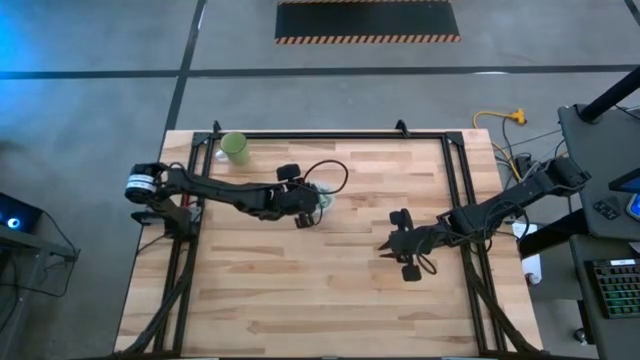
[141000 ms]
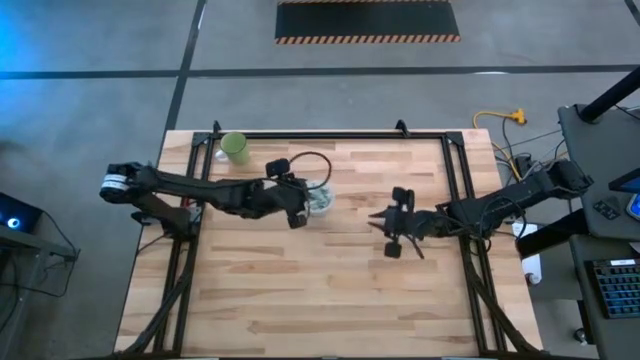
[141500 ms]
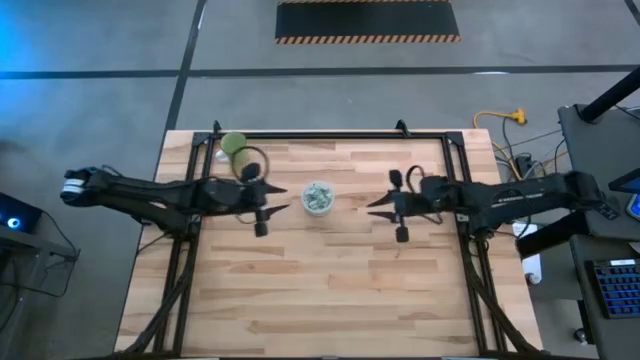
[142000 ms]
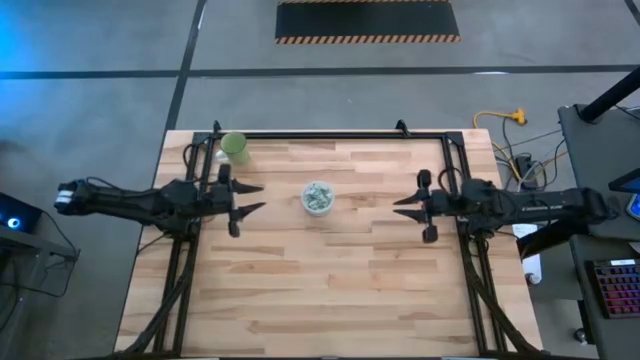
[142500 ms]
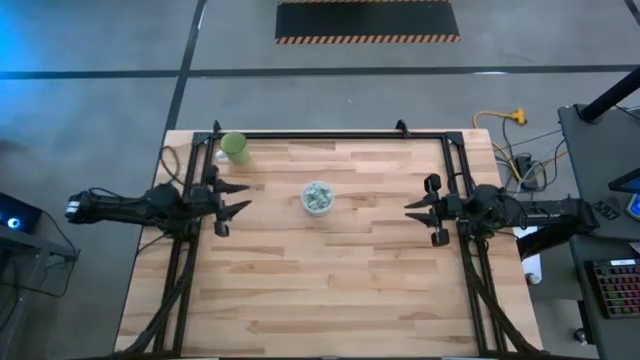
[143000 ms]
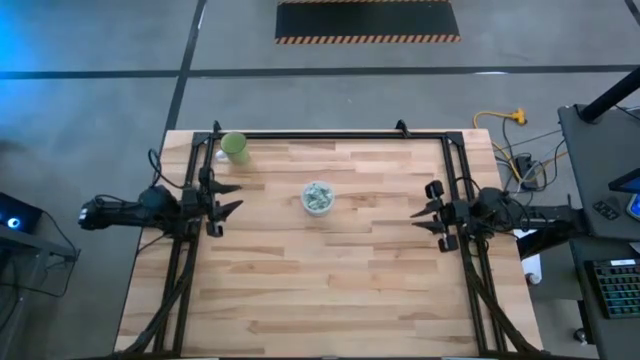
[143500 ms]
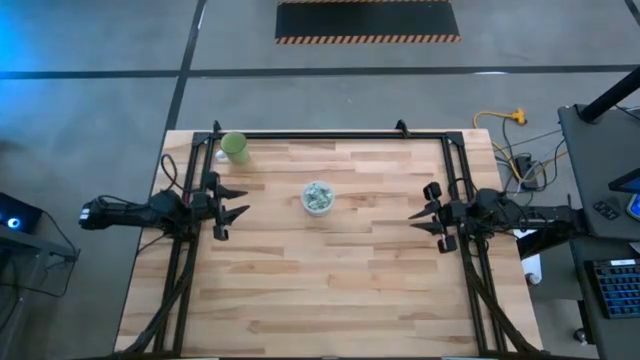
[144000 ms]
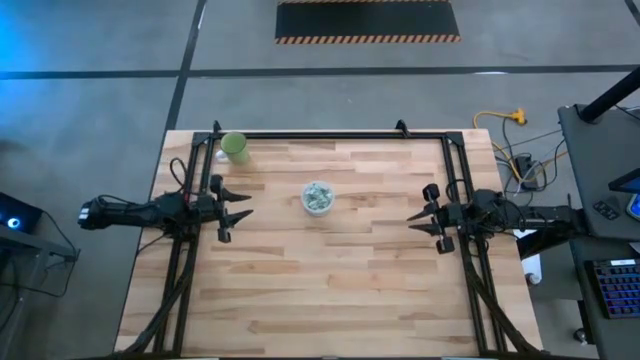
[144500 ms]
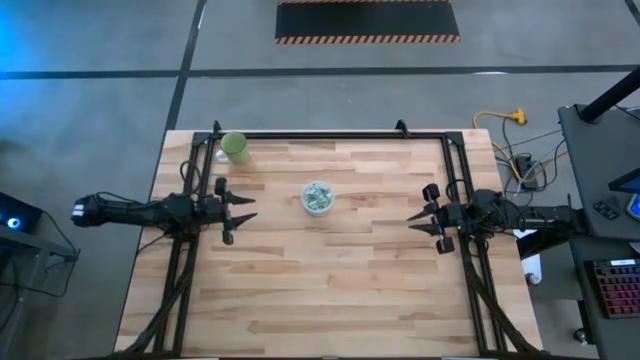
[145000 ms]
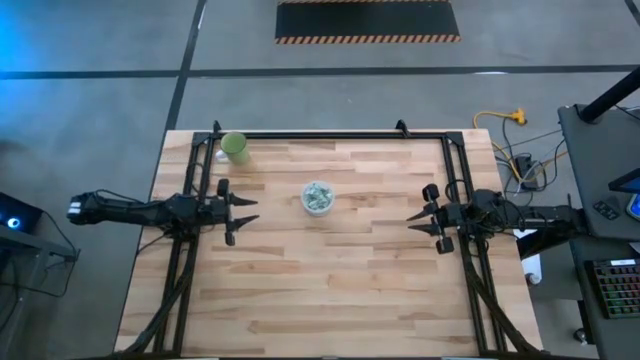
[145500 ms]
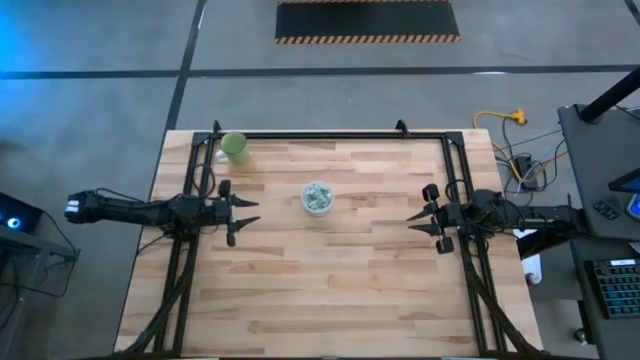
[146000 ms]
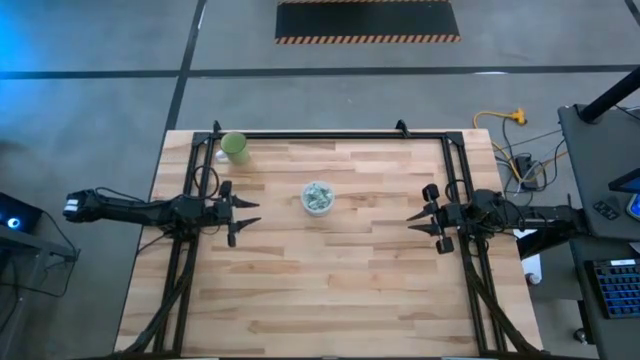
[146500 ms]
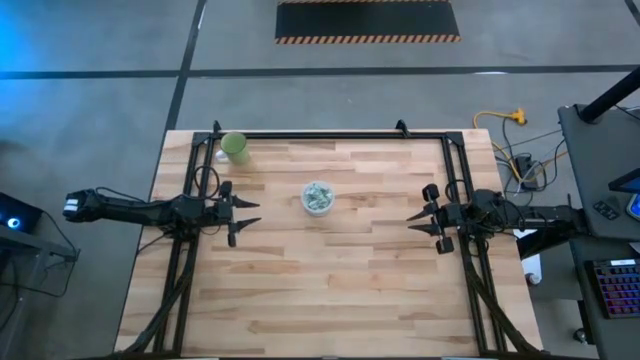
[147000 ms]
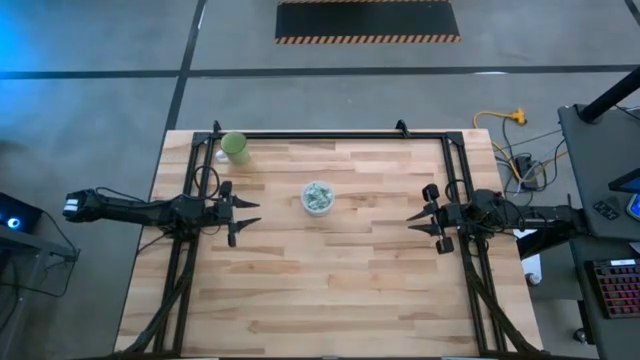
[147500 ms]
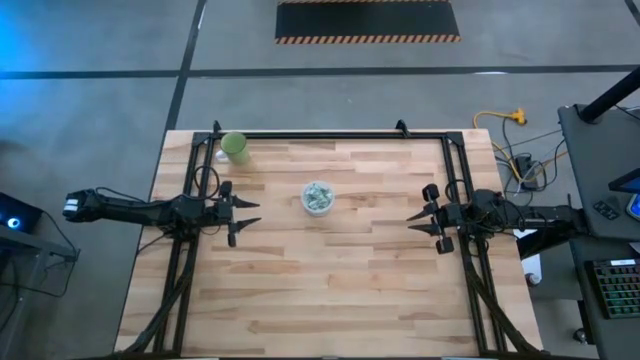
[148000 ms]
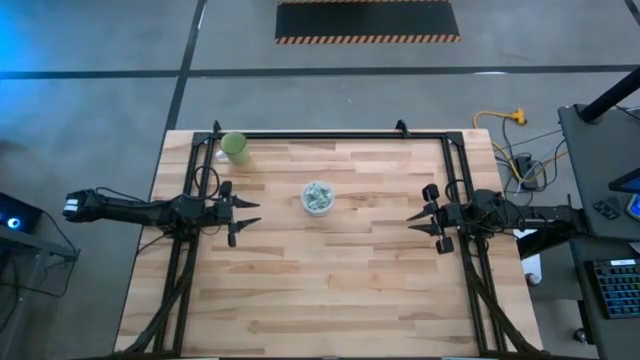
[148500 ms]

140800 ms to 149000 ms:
Task: Pick and place Stevia / Truvia into bins
Return to Home Position

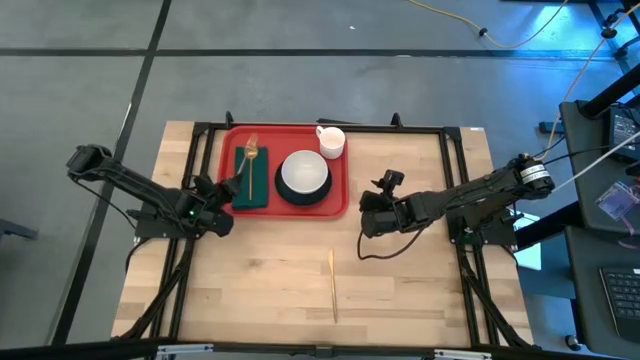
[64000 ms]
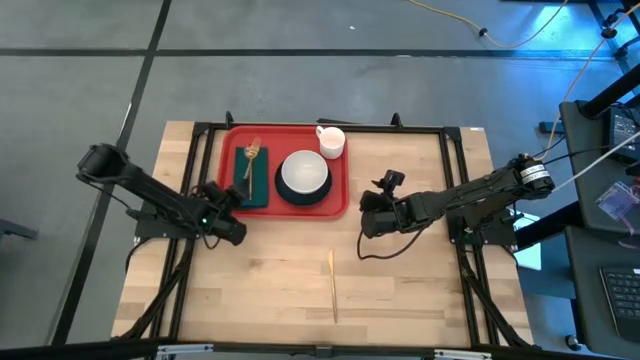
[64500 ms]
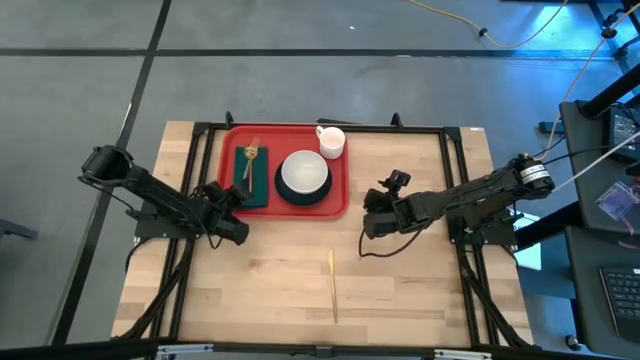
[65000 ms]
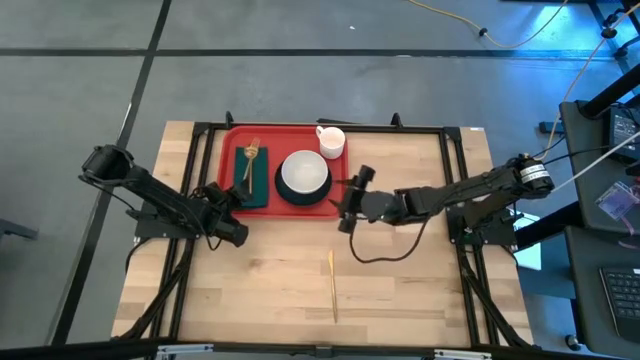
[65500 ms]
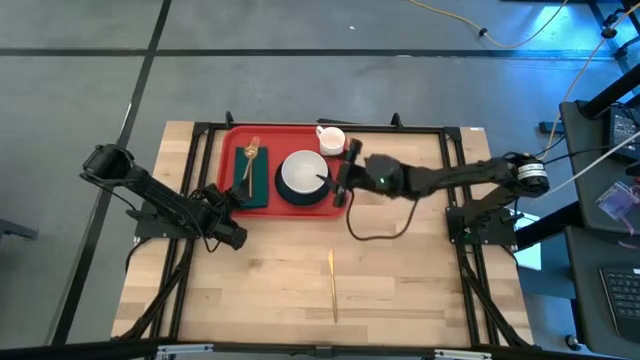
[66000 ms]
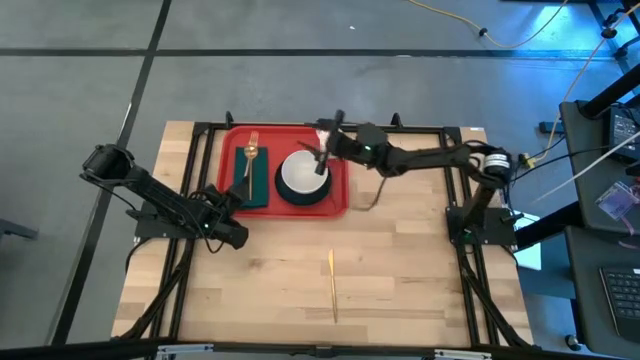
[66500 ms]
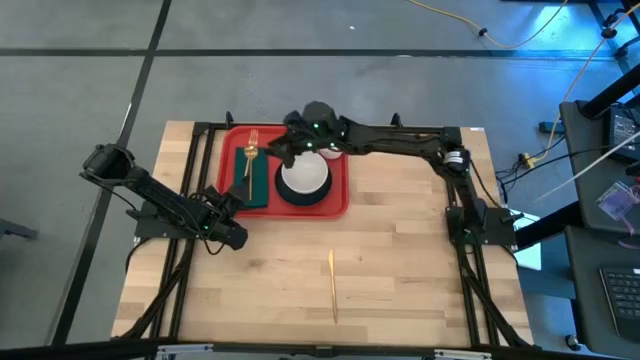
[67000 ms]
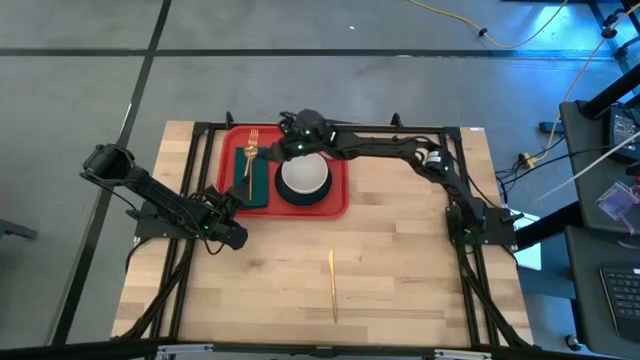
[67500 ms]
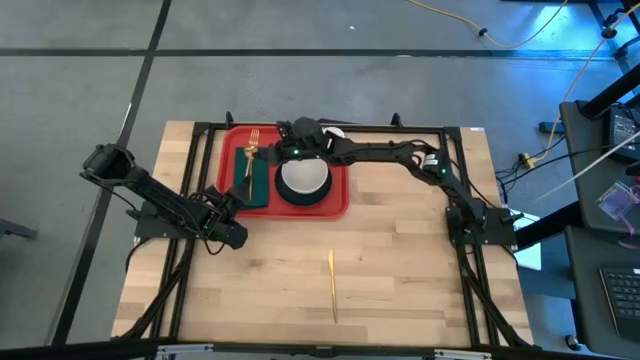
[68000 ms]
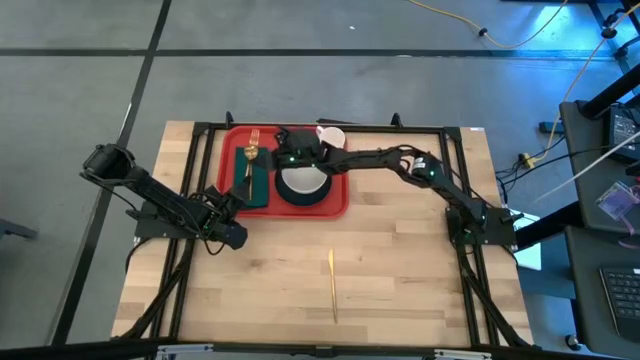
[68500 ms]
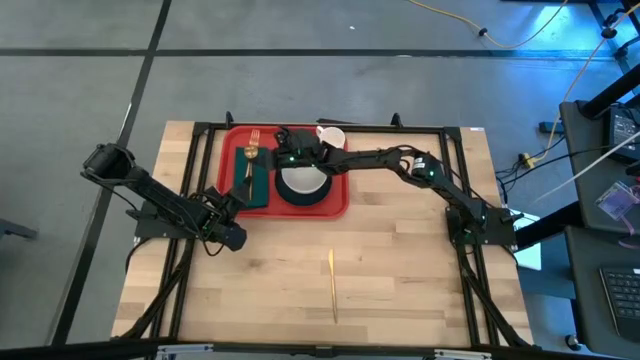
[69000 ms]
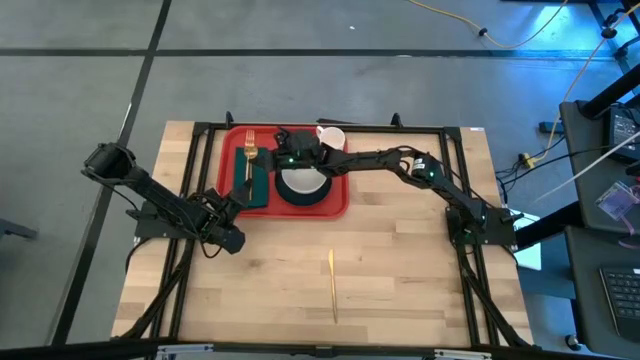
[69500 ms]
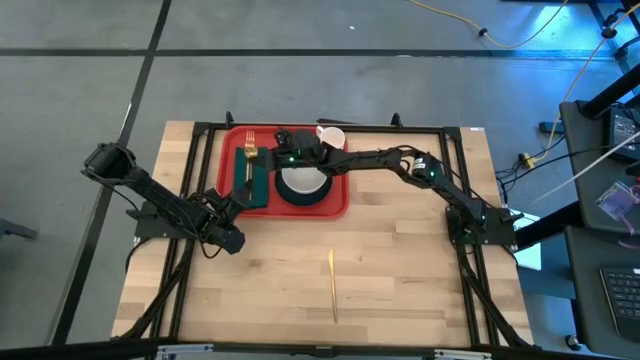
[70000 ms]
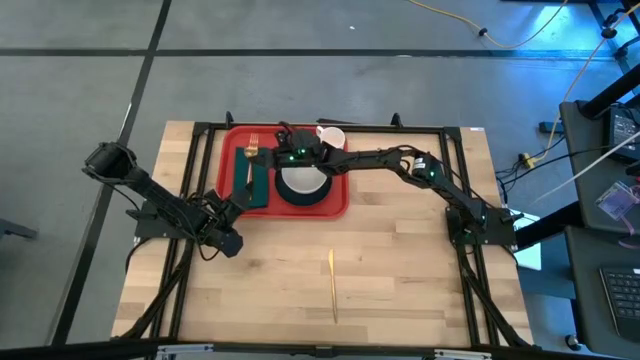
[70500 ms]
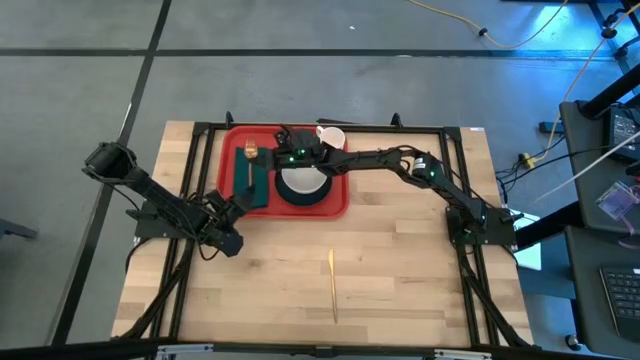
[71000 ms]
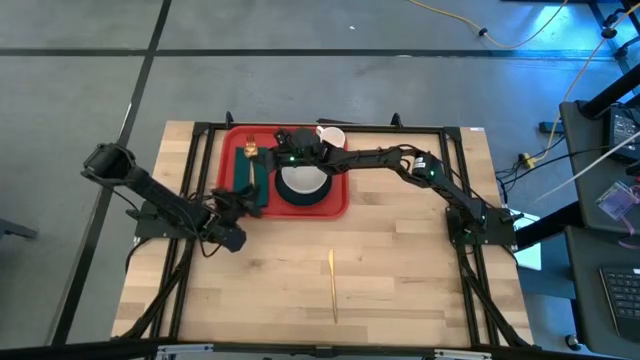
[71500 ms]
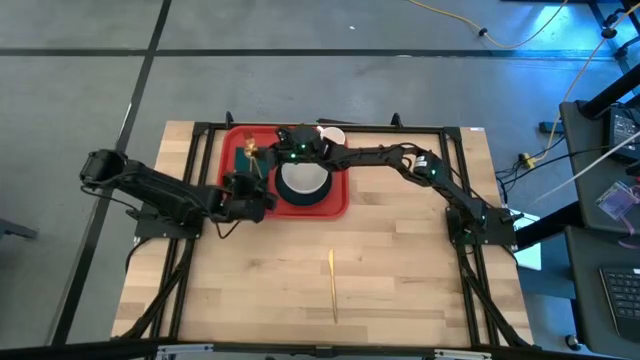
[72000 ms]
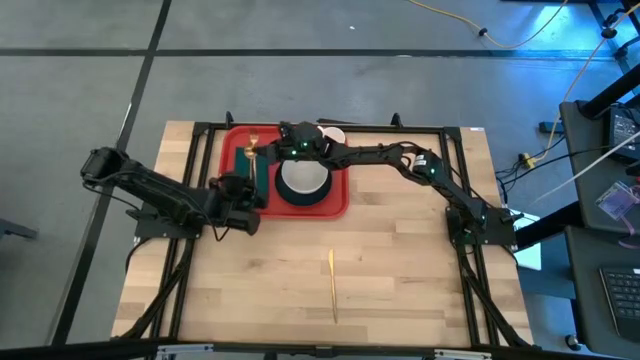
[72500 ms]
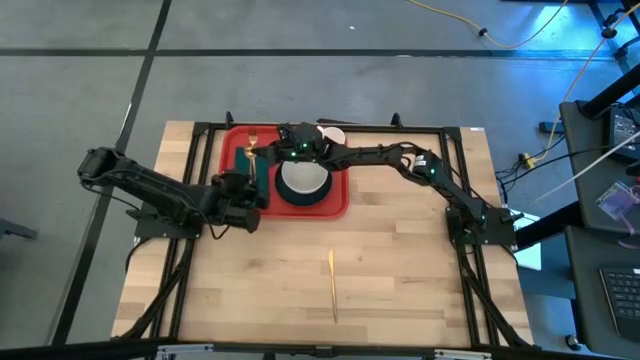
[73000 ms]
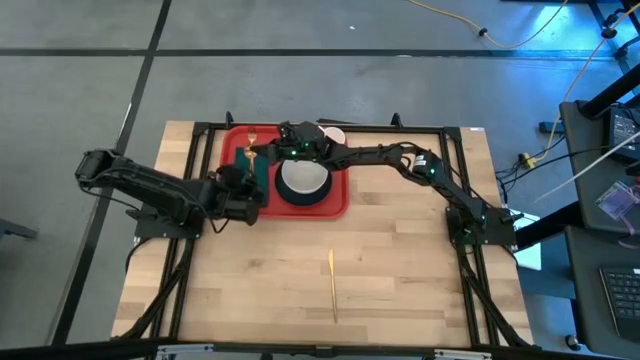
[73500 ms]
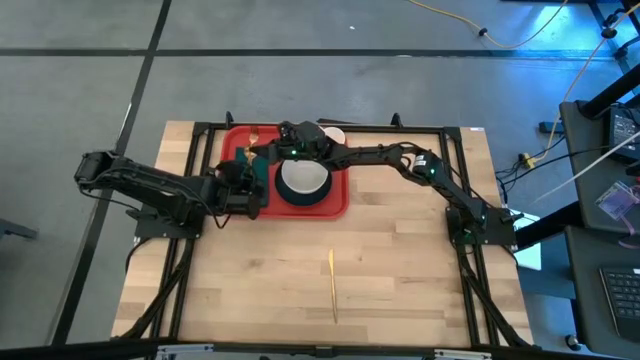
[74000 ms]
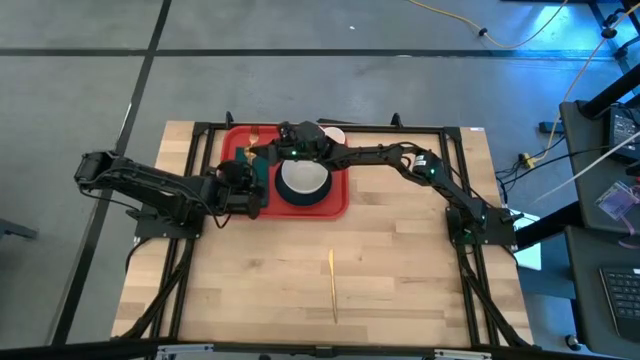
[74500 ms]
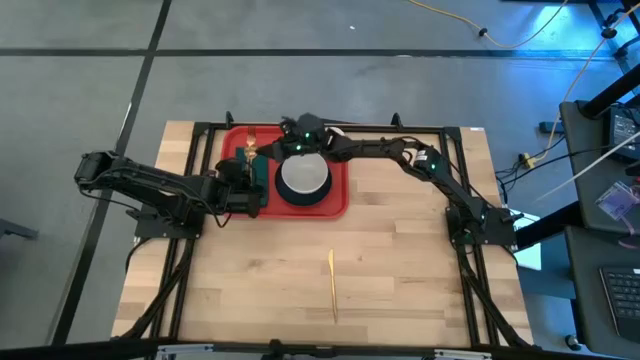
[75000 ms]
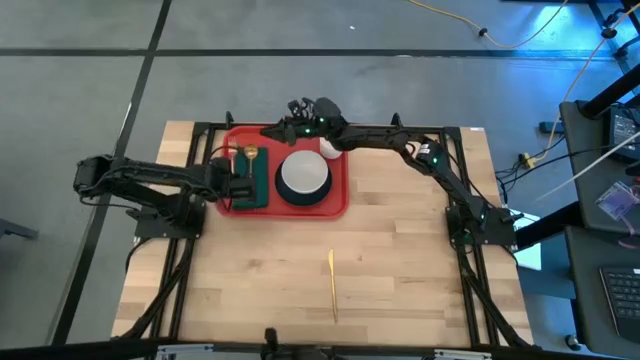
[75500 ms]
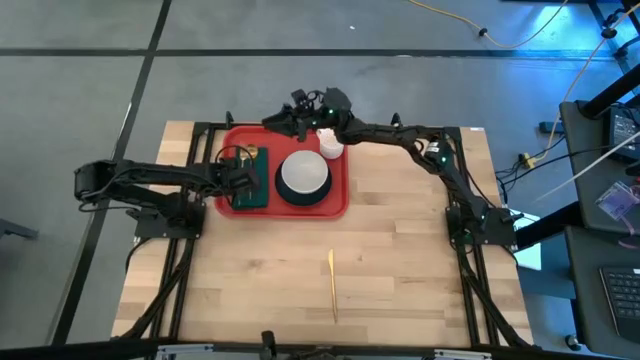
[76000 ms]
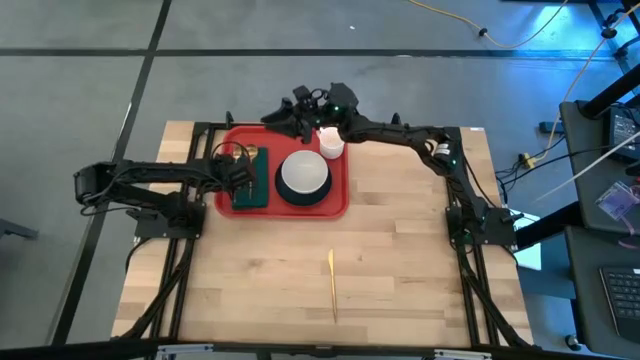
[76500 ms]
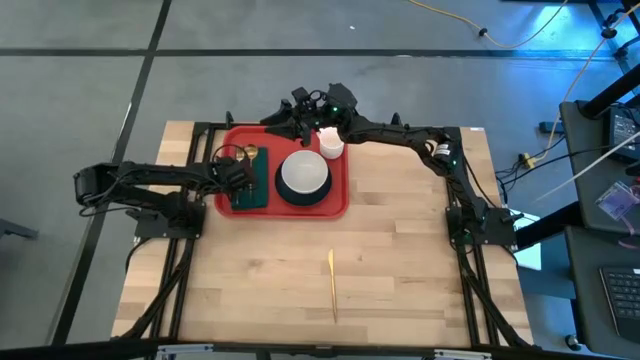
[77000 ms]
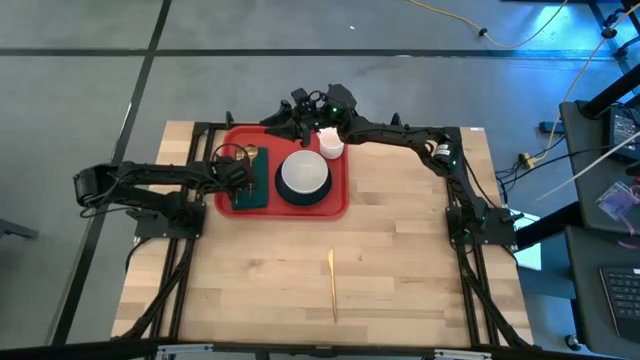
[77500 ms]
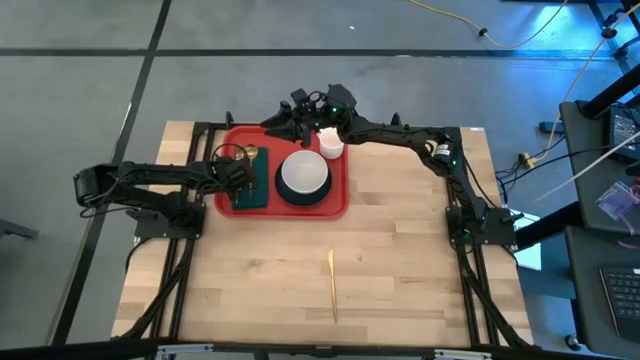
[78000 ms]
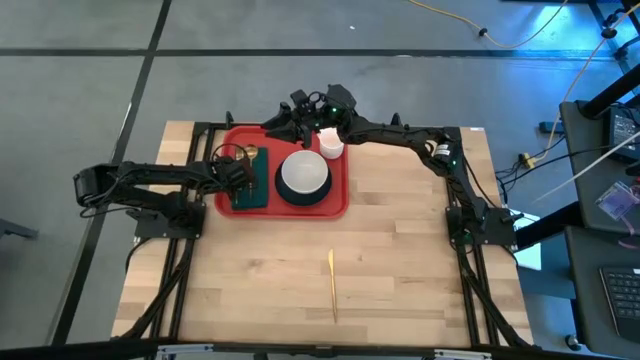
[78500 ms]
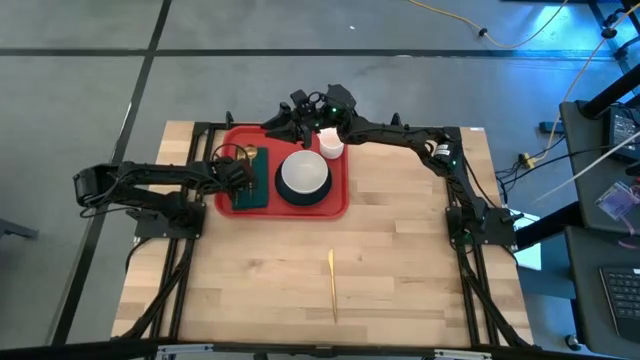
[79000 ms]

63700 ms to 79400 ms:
Task: Set up tray
Put the gold fork on the green napkin to the left of the gold spoon
